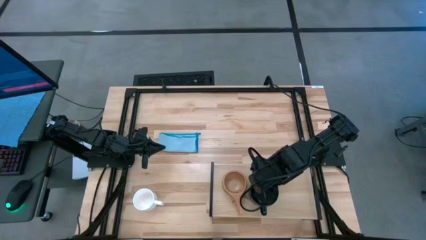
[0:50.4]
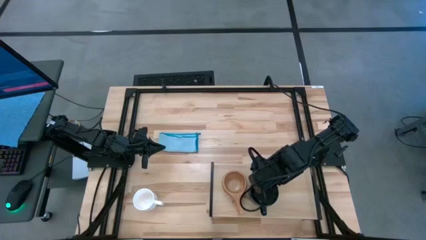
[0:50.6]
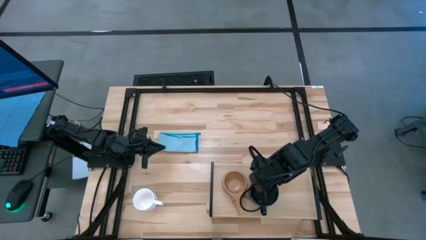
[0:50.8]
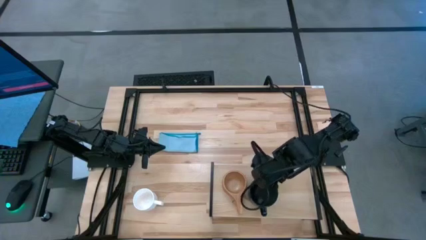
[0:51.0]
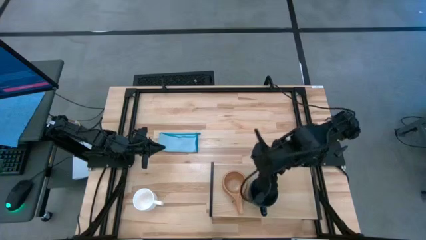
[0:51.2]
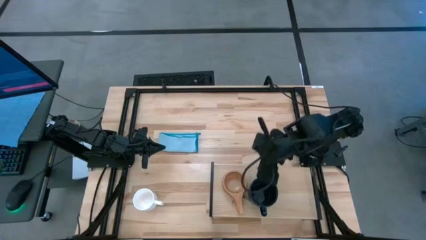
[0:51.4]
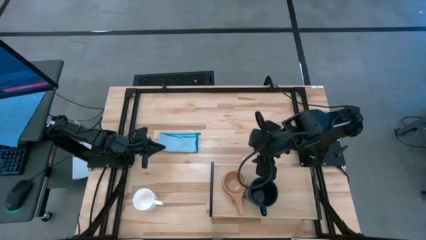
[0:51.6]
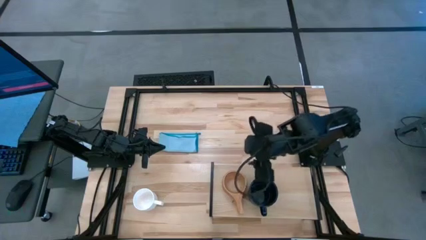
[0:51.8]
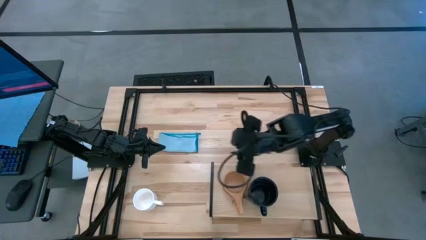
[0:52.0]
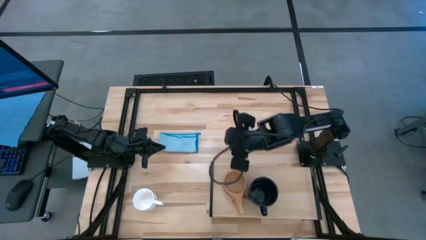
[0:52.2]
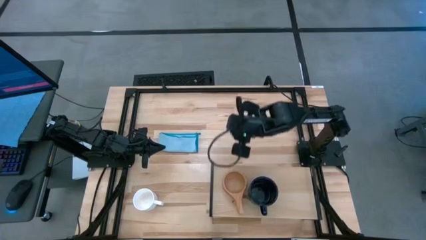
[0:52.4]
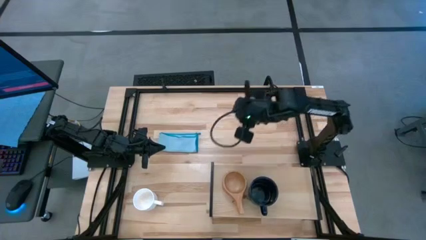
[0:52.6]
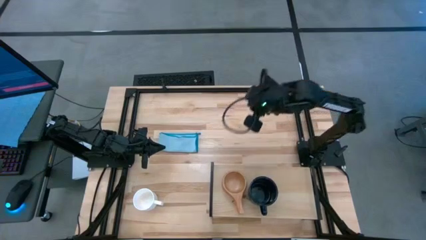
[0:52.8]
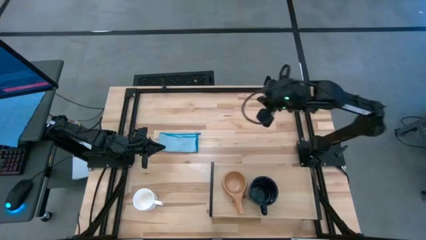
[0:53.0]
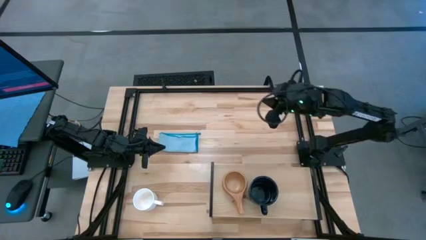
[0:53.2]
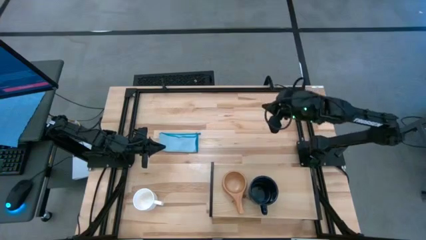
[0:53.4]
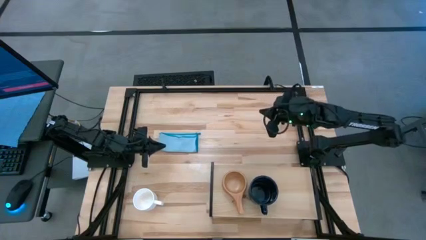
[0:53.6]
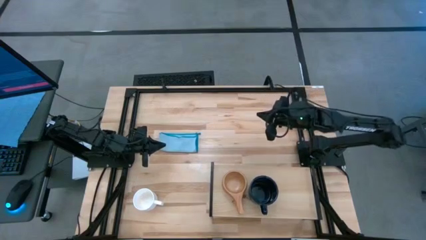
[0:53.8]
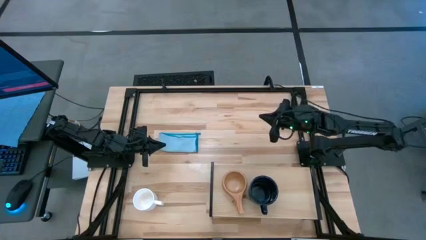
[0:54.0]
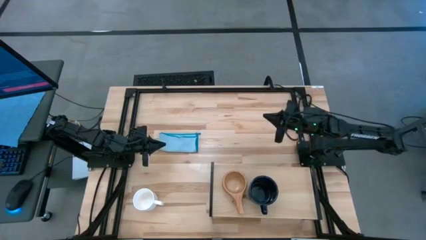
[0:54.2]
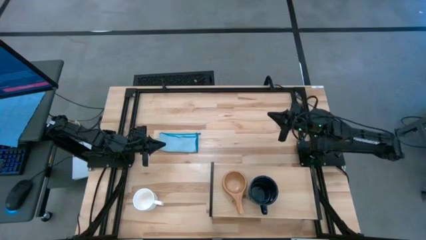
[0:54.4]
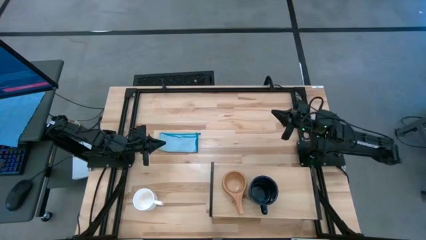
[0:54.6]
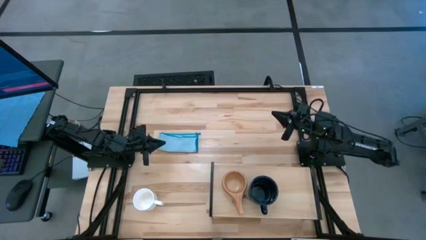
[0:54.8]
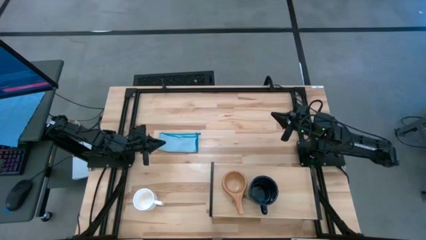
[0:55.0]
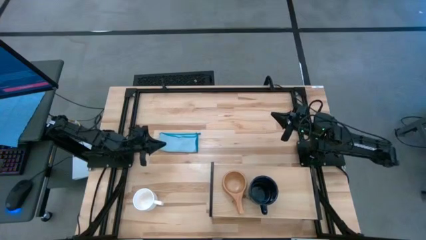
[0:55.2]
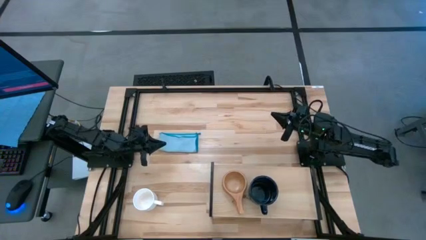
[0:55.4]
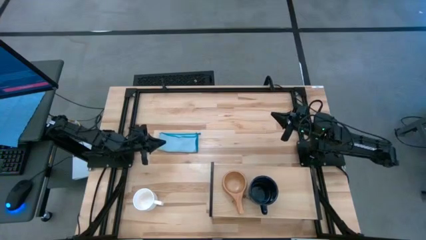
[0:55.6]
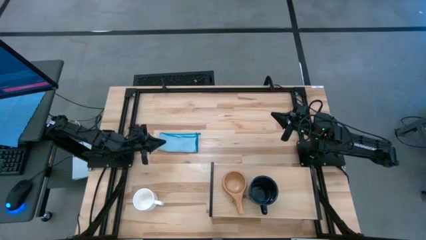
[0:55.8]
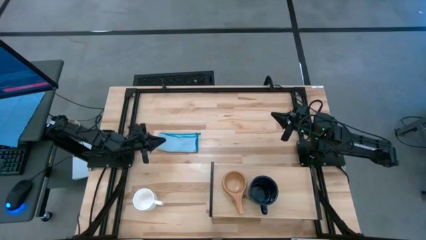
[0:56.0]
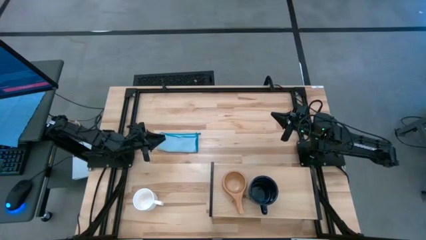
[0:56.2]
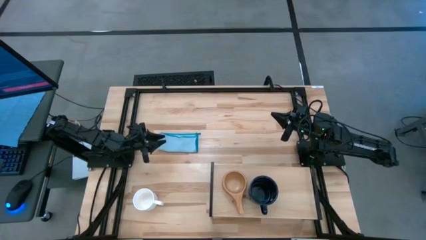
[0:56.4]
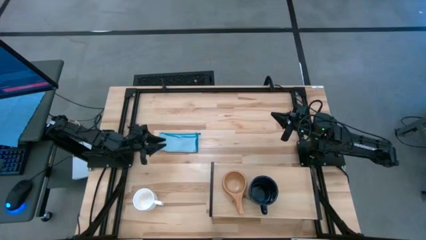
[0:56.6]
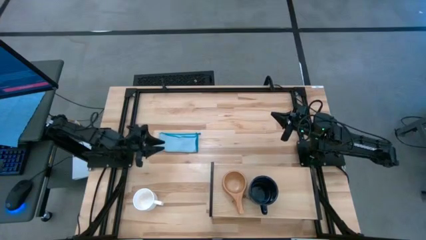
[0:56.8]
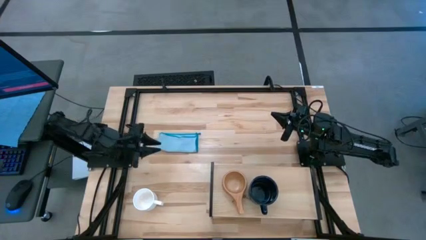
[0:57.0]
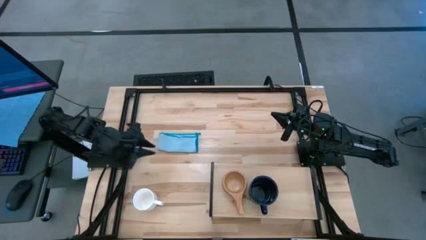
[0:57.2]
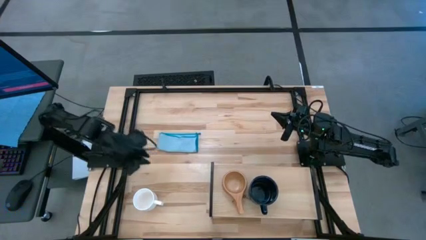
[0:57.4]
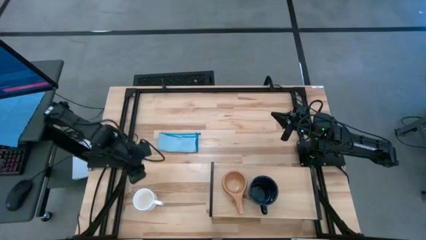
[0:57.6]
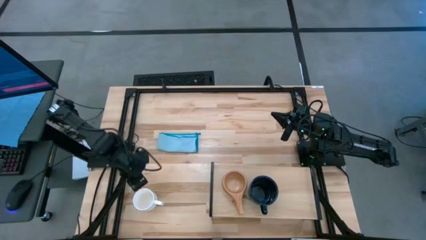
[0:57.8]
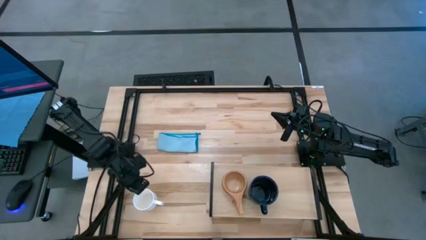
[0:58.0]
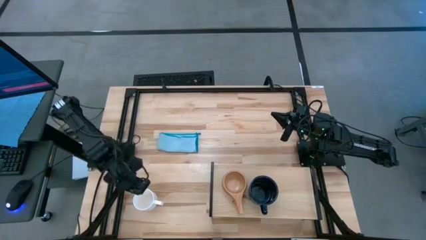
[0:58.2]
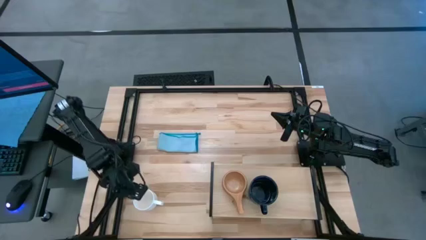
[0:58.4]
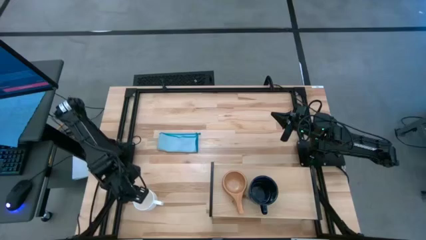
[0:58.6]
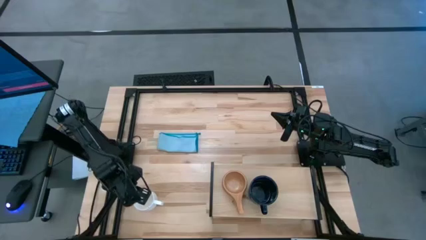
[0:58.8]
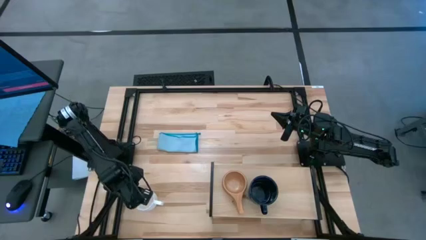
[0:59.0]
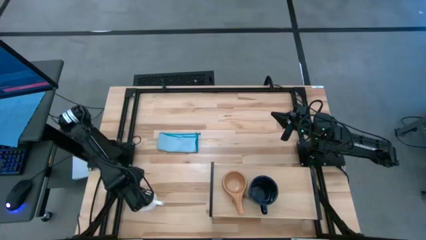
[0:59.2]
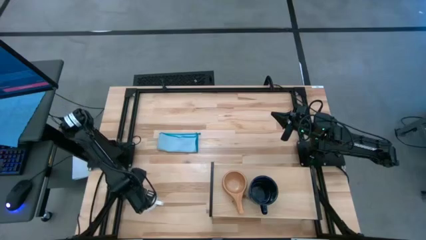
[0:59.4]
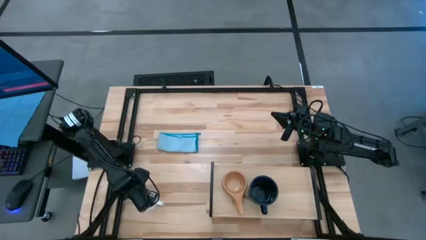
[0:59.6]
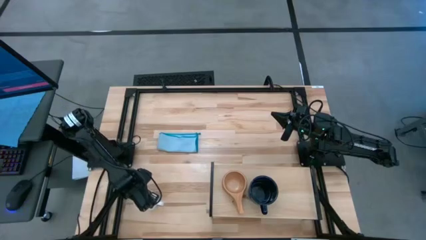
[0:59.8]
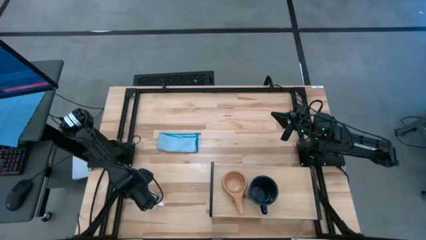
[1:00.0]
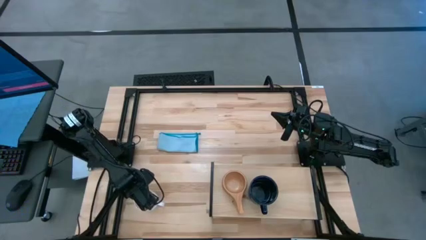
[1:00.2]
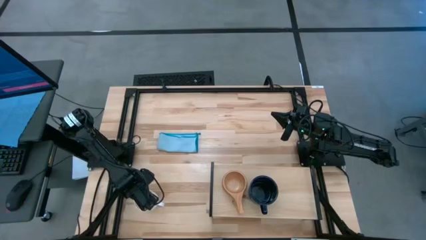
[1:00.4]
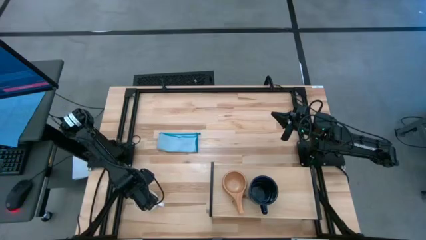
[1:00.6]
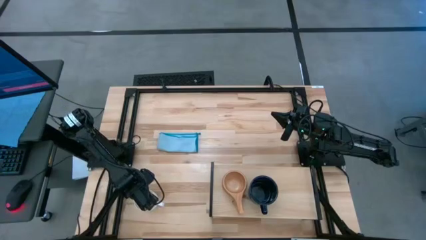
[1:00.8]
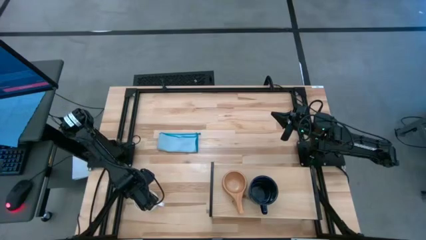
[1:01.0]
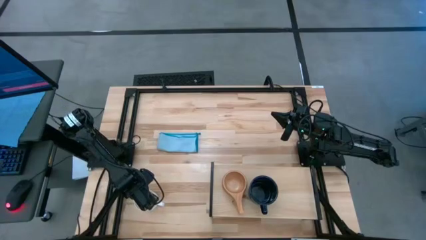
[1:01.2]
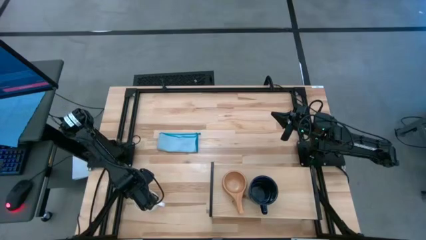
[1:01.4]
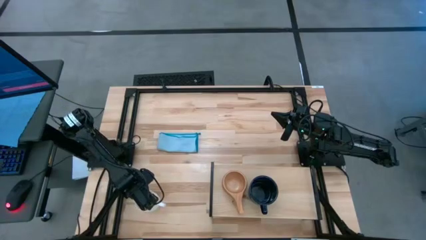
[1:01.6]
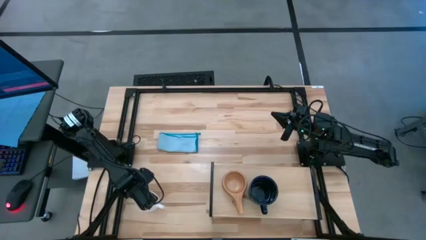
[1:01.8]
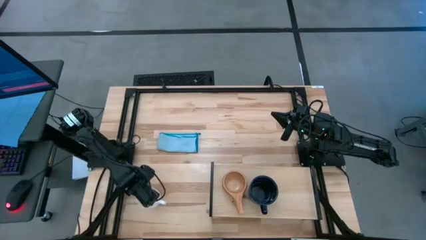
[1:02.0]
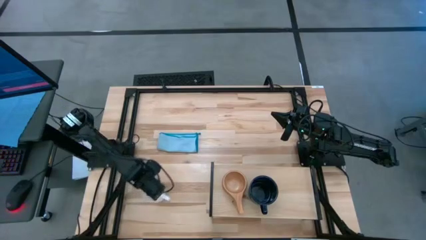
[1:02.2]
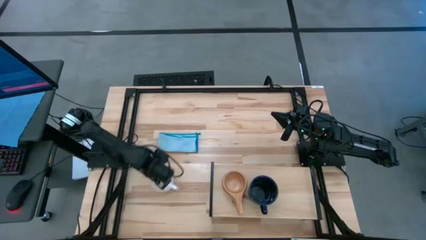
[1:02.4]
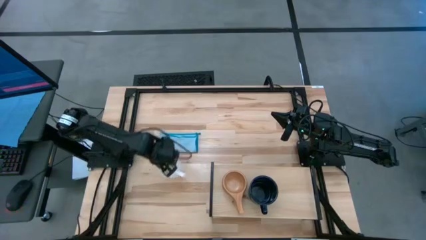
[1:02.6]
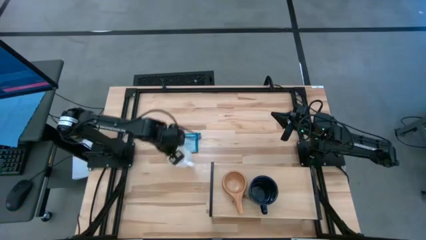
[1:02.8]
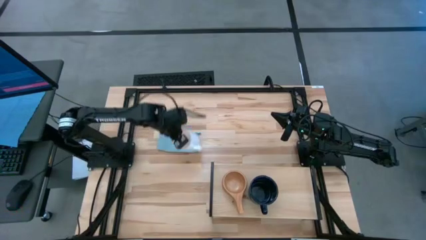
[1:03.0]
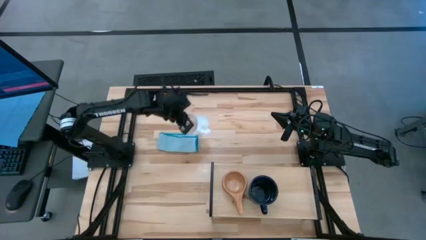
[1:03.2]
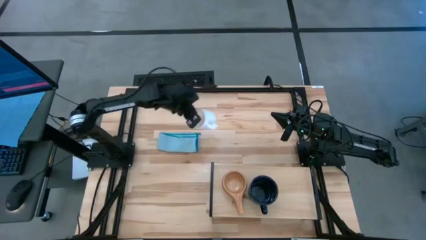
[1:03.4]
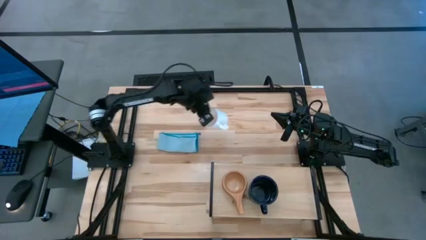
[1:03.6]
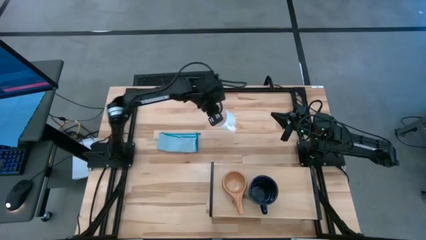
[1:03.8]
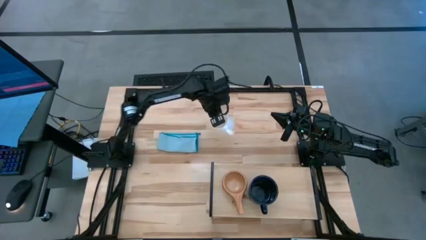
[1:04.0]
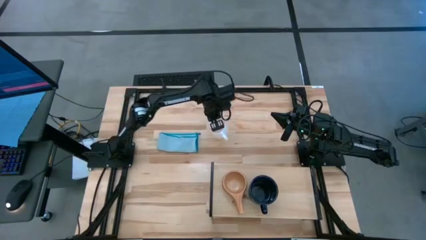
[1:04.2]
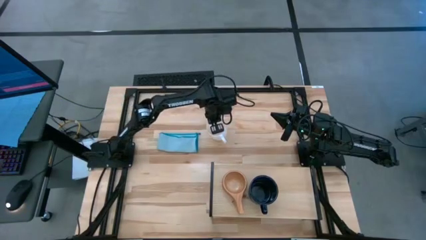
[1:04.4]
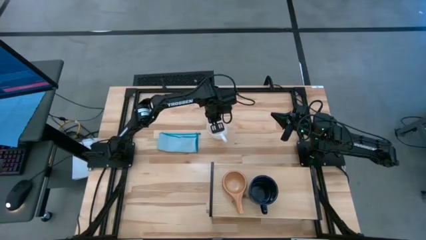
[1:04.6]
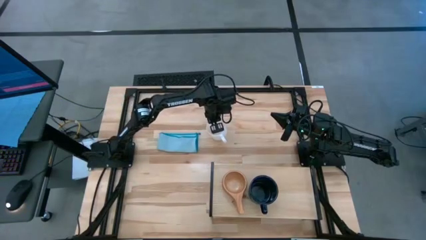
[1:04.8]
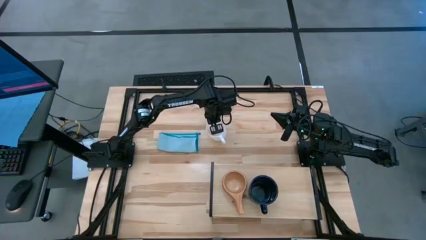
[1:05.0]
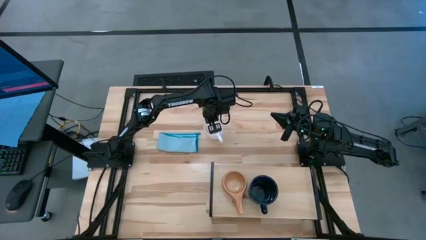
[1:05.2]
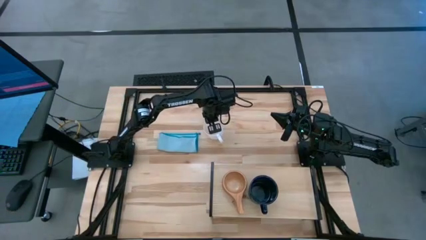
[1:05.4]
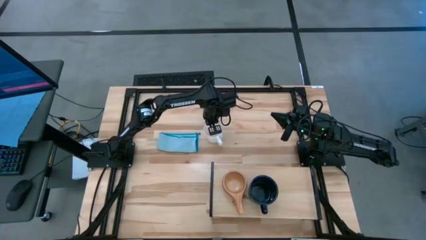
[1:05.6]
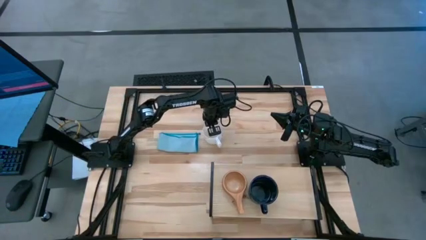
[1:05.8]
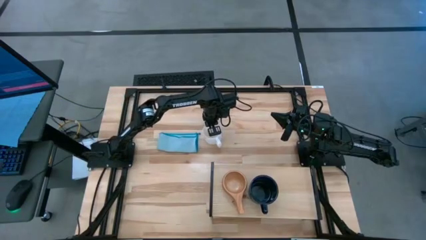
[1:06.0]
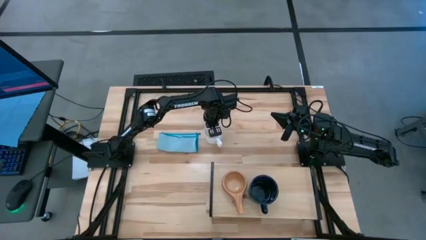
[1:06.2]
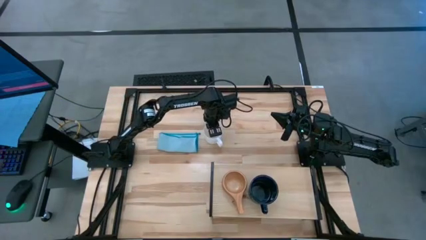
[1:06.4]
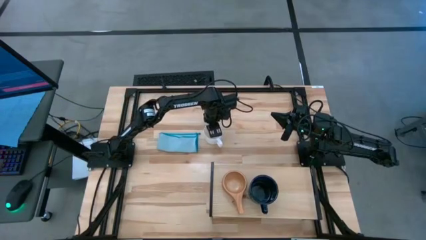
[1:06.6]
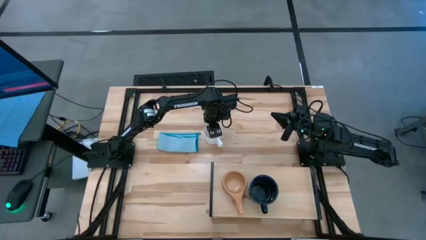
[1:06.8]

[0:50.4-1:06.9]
Task: Stack small to large cups/mugs on shelf
Put the white mug on the shelf
